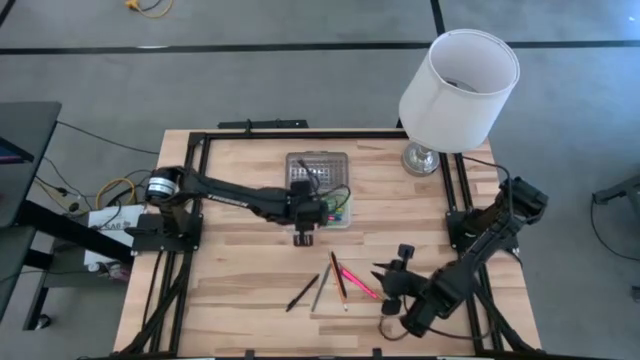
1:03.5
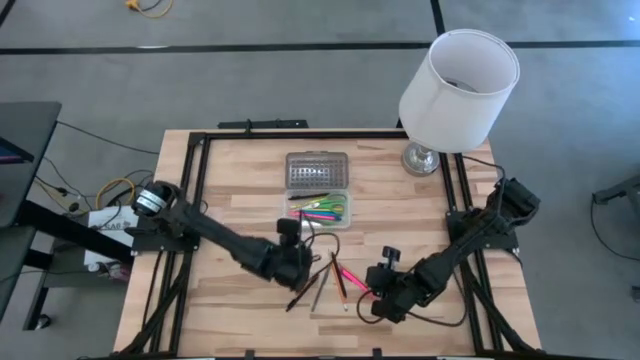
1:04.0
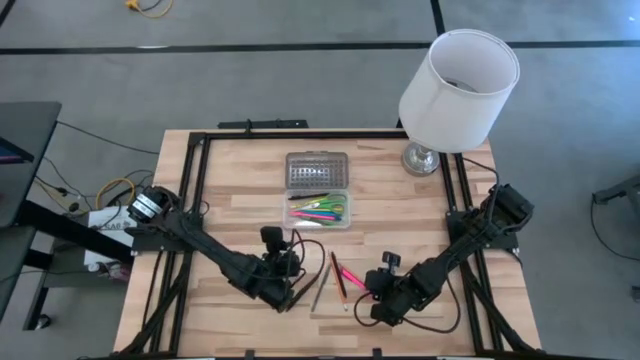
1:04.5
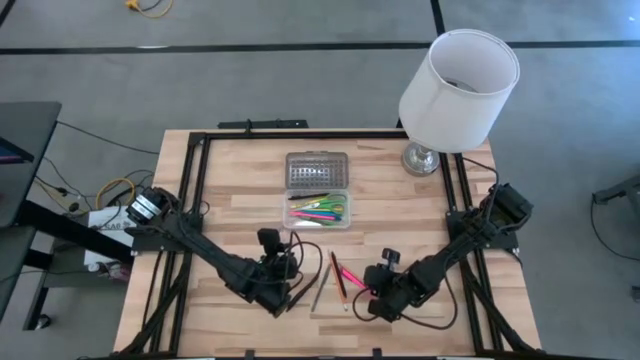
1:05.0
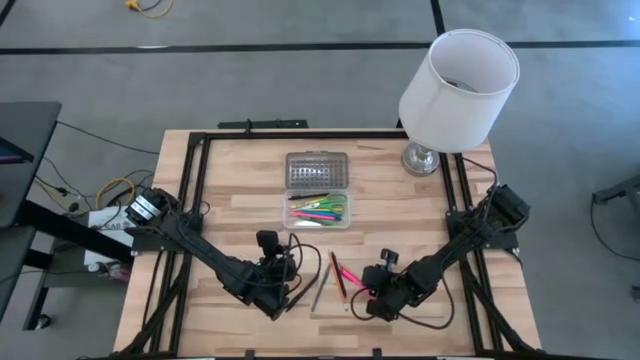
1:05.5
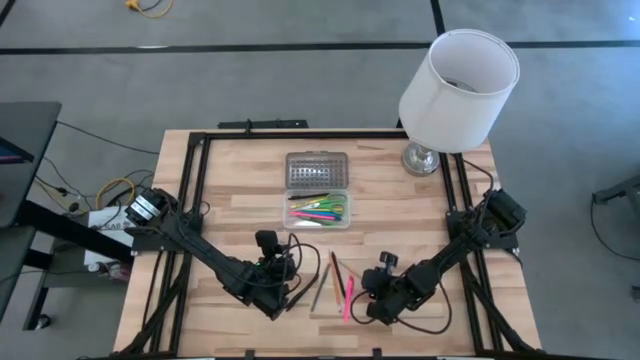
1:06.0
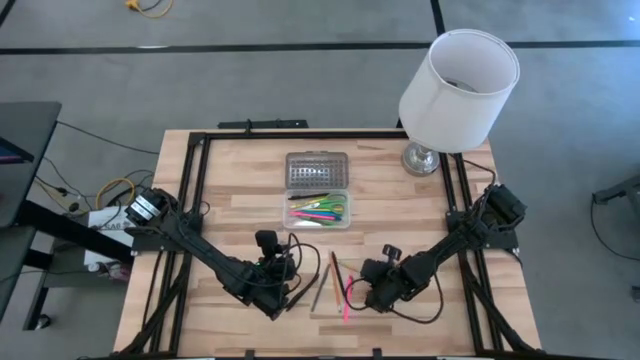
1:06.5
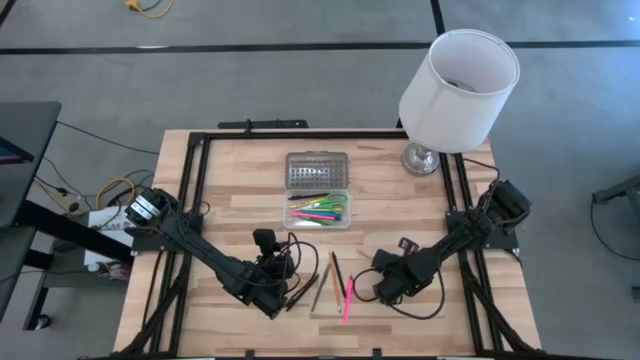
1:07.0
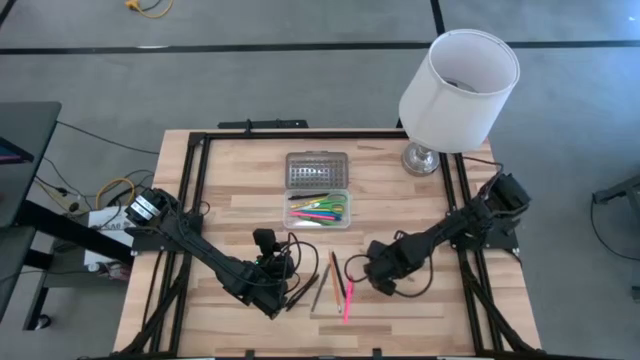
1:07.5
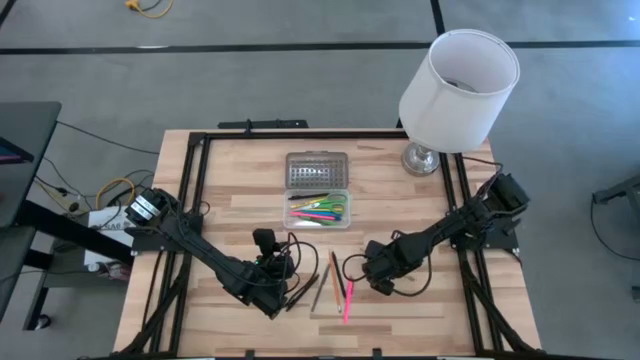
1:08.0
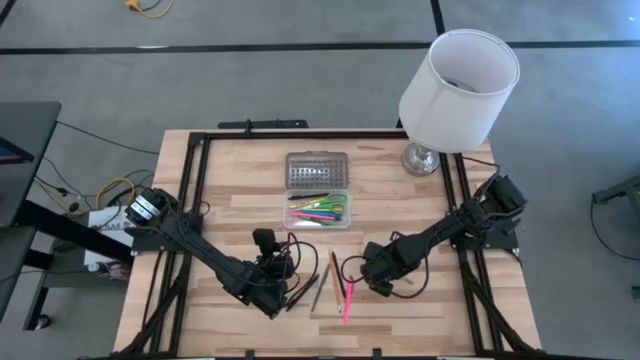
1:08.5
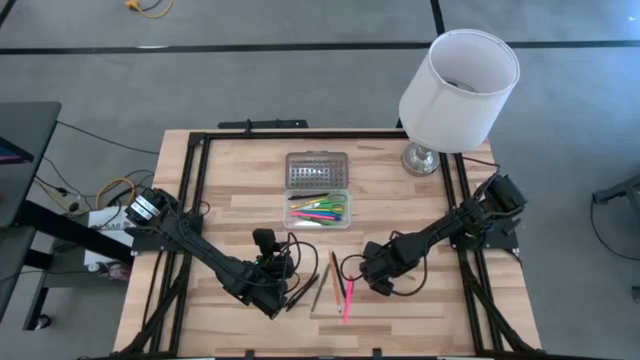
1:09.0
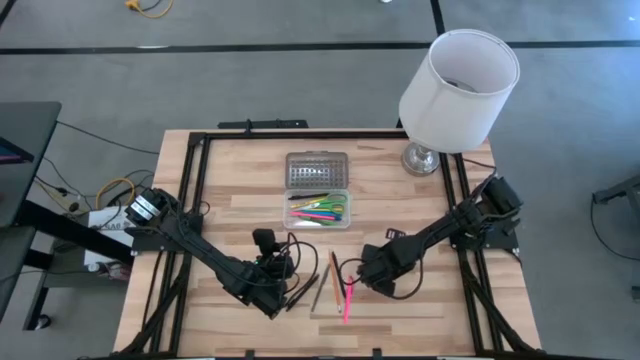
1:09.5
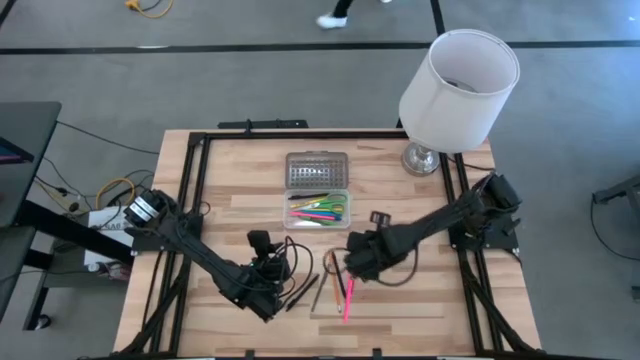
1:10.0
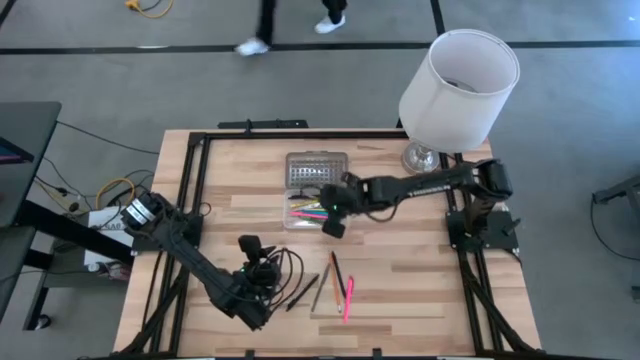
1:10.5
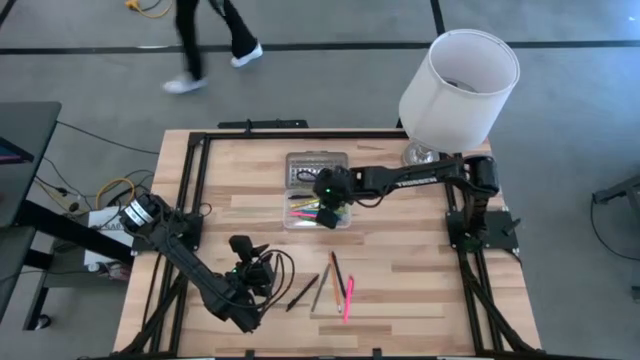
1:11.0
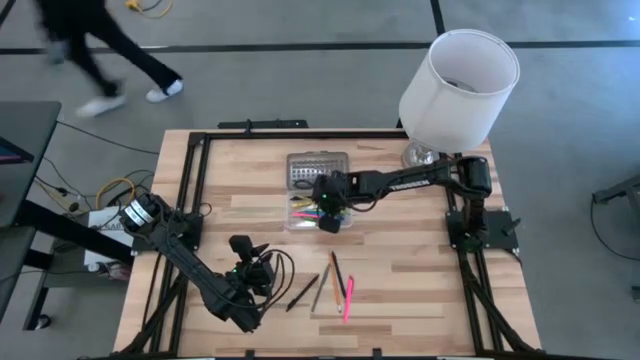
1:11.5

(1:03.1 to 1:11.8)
Task: Pick & place school supplies into a supply box
Put the yellow pencil into the black supply box

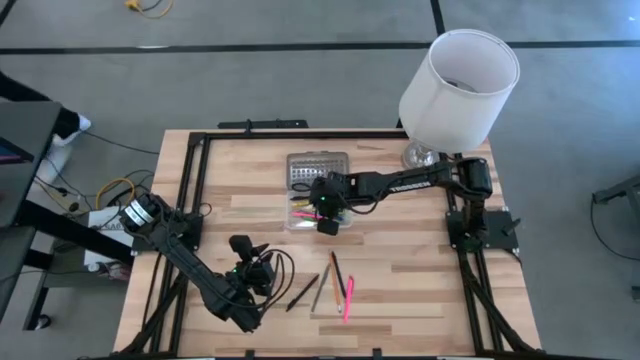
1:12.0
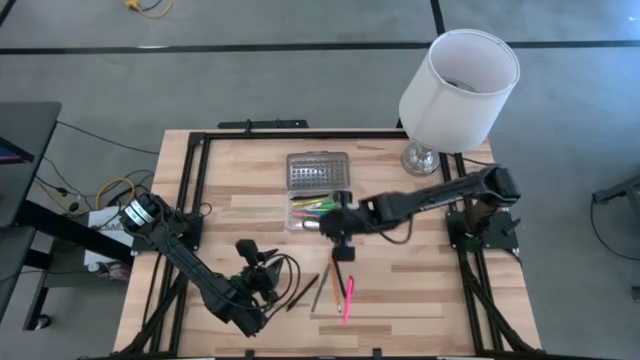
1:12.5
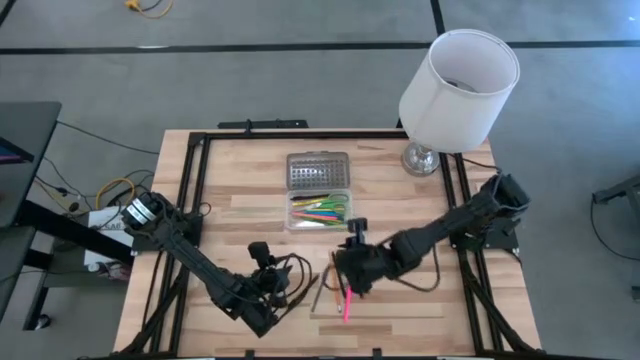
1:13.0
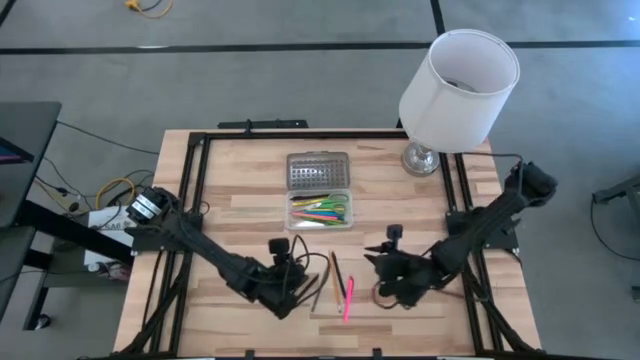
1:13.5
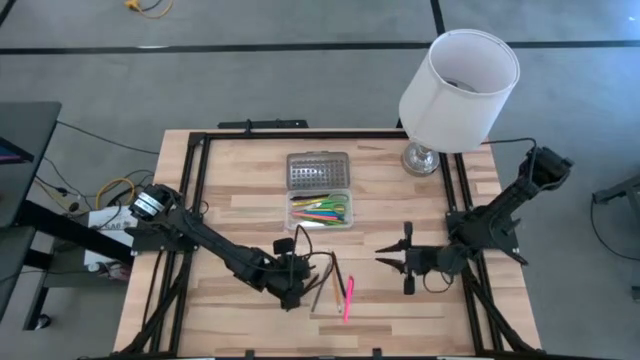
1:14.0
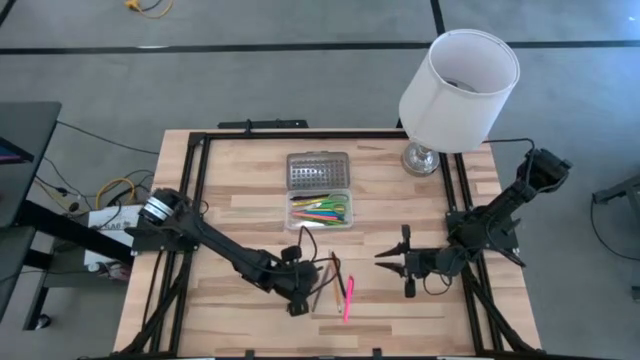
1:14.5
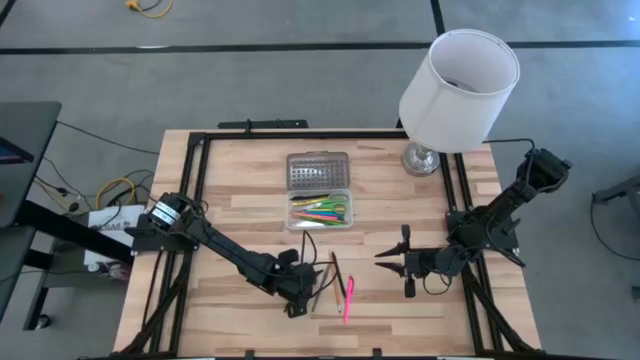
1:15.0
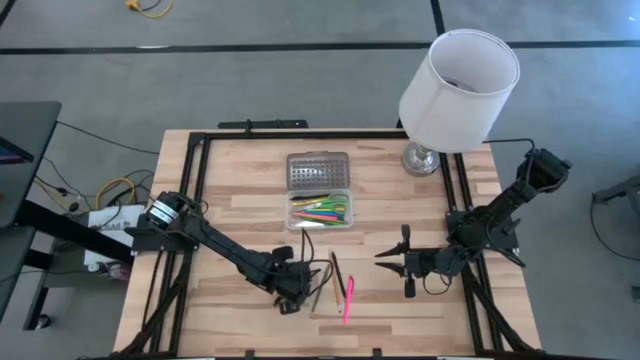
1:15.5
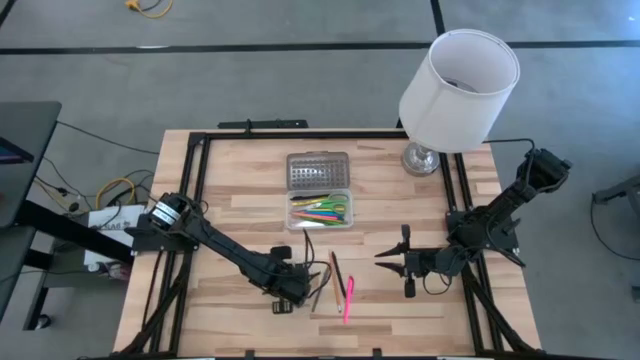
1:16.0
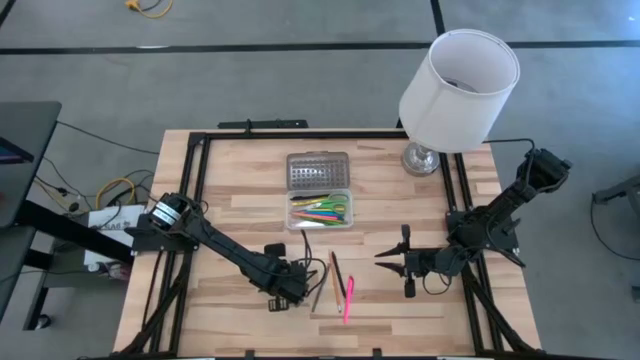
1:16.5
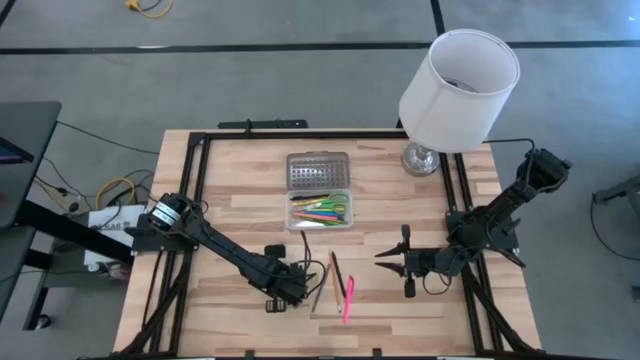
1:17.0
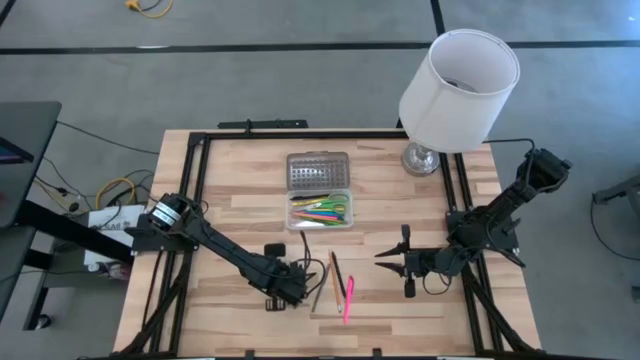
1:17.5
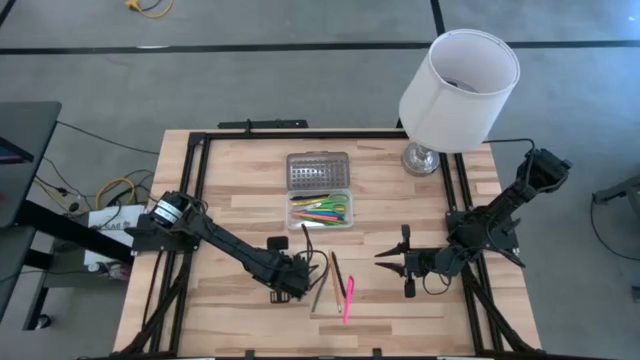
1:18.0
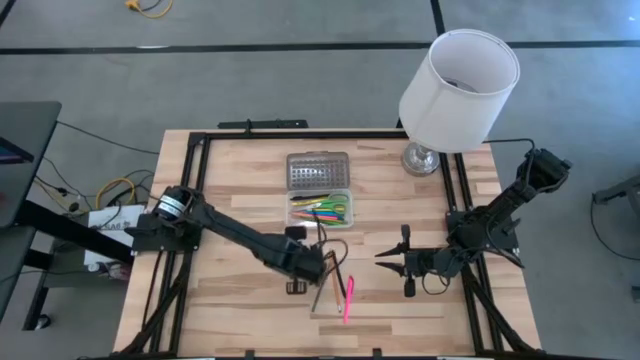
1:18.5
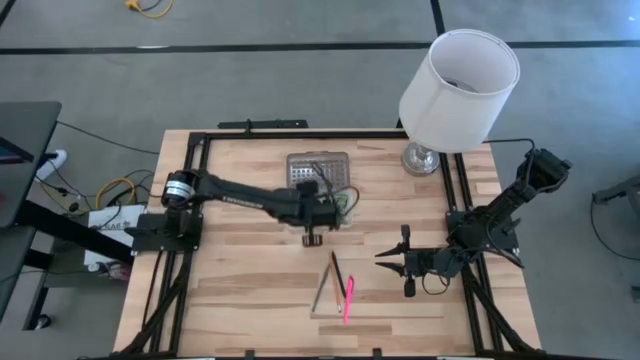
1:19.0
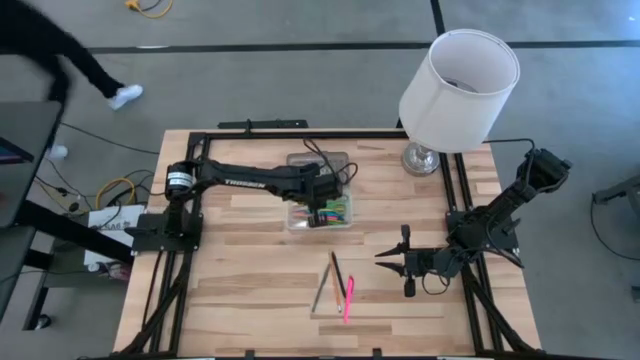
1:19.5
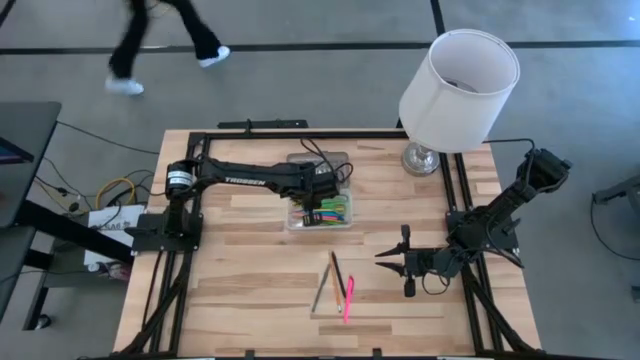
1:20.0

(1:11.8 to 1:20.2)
Put the left black pen into the black supply box

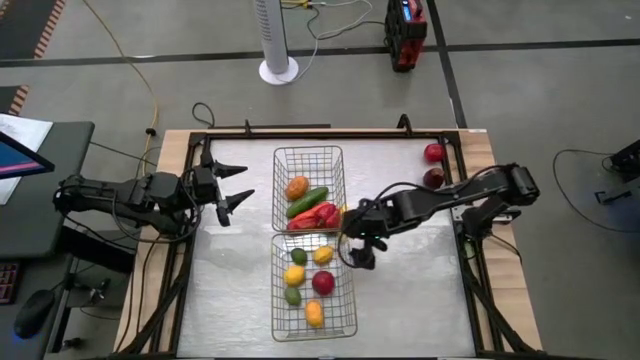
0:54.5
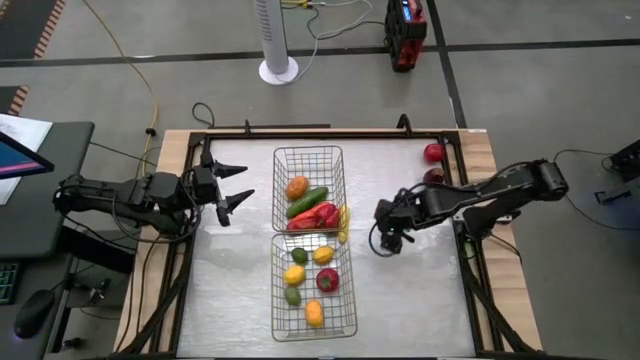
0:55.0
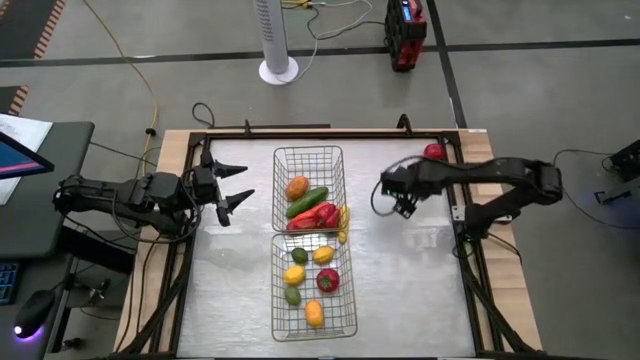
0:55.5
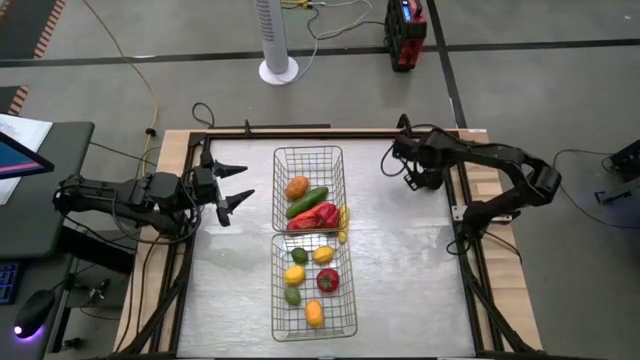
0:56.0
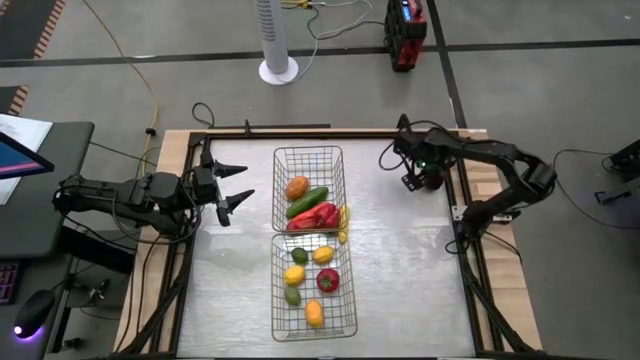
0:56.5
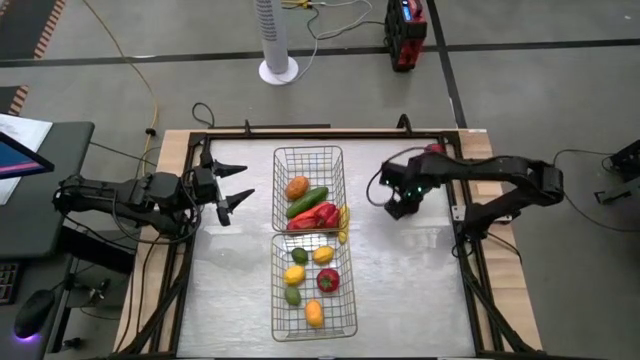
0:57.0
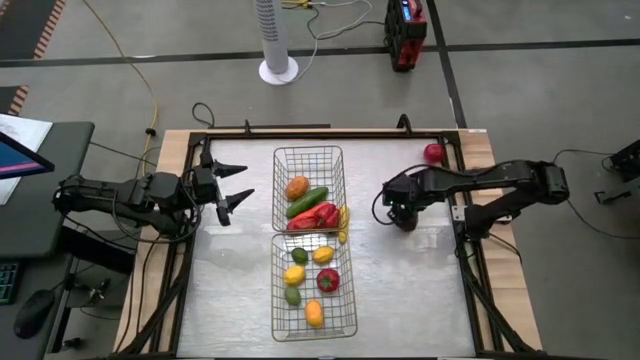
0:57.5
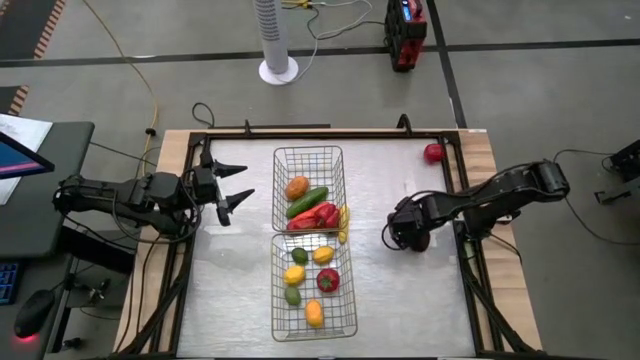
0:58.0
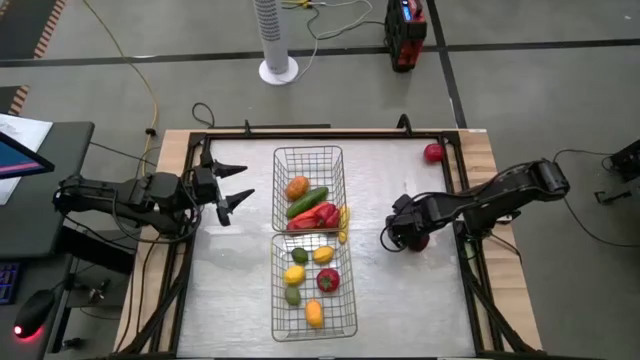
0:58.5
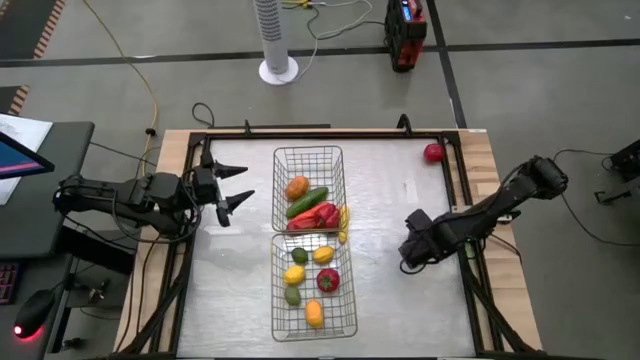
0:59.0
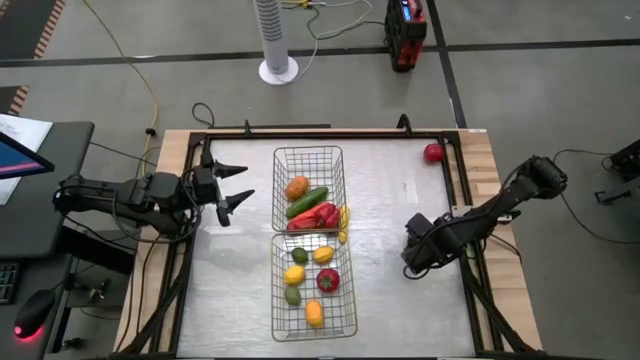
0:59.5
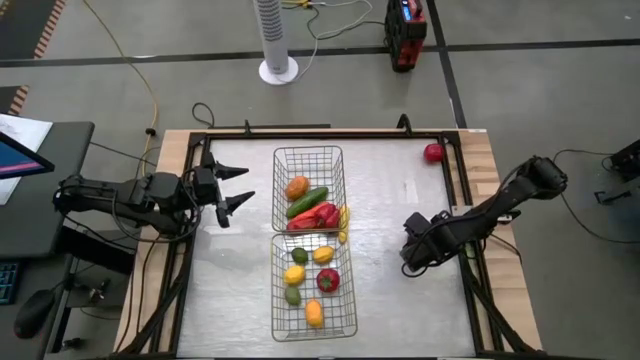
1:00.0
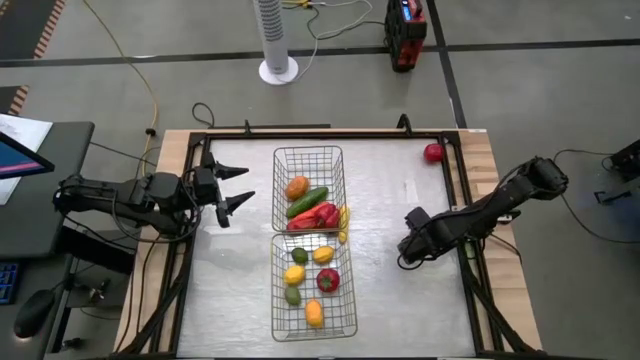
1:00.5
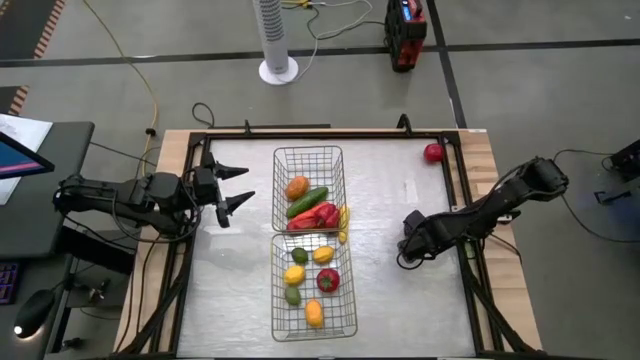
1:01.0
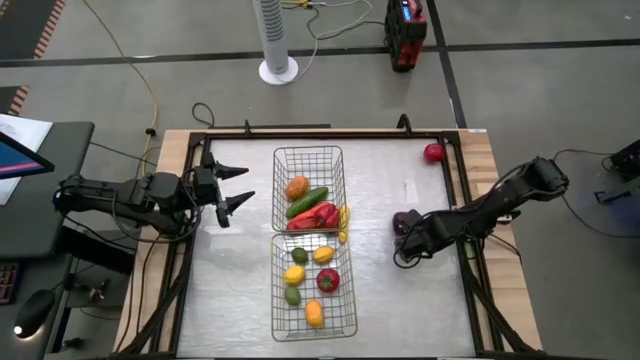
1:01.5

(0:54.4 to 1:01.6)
Task: Sort produce into baskets
Put the red apple into the bottom wire basket
